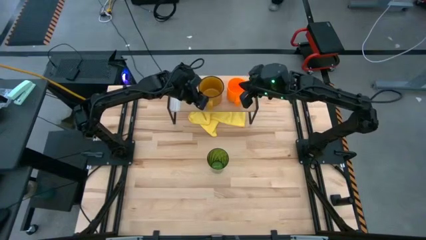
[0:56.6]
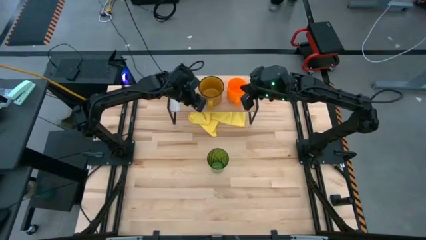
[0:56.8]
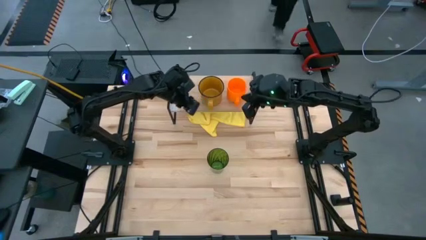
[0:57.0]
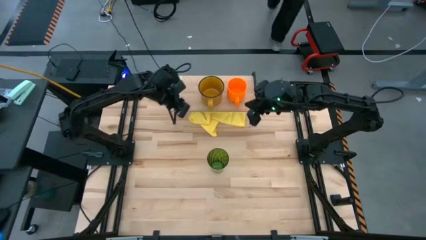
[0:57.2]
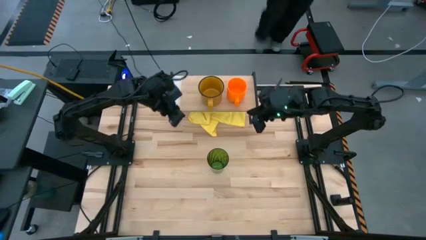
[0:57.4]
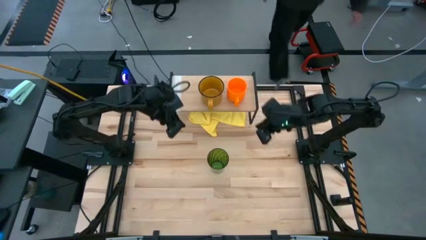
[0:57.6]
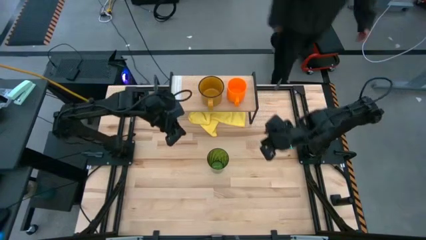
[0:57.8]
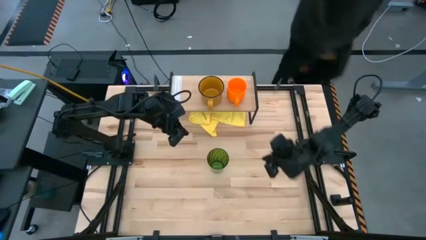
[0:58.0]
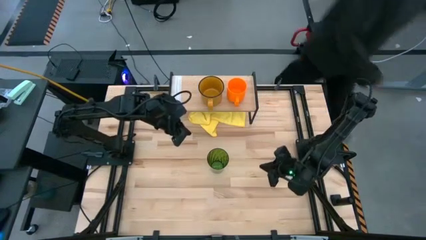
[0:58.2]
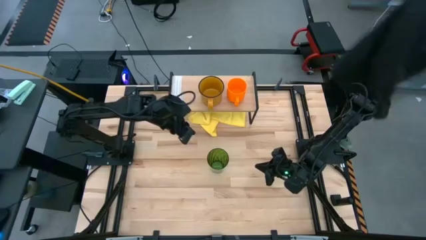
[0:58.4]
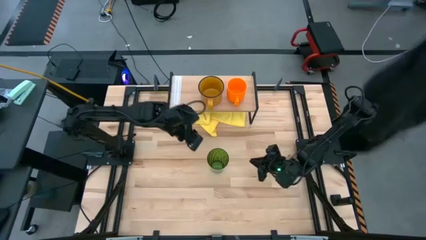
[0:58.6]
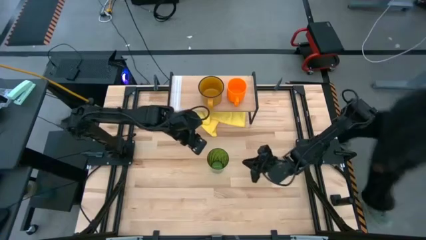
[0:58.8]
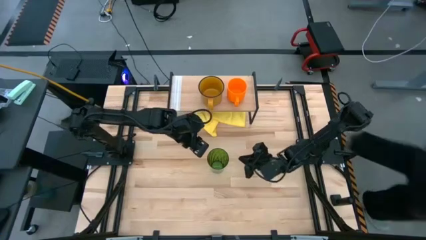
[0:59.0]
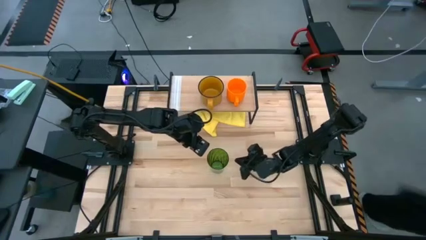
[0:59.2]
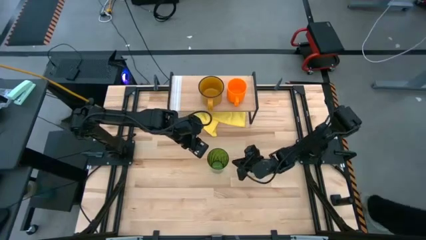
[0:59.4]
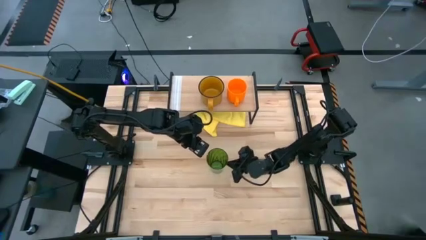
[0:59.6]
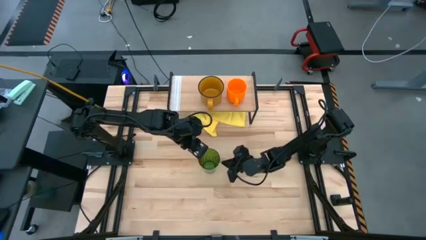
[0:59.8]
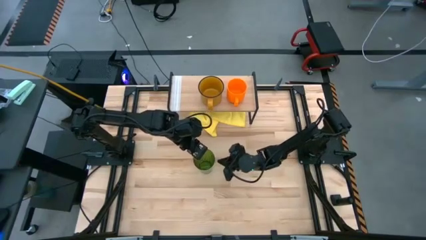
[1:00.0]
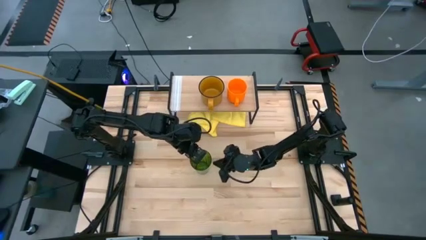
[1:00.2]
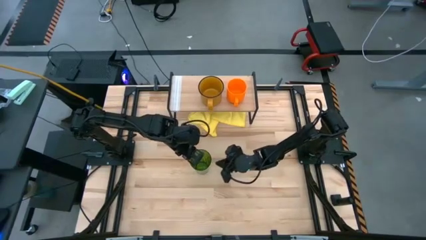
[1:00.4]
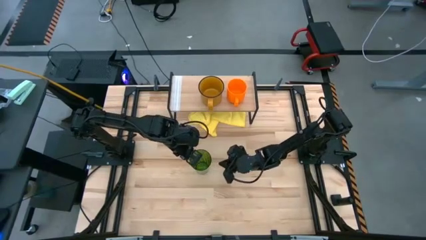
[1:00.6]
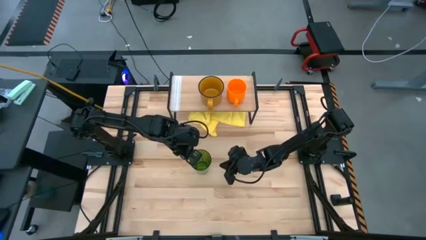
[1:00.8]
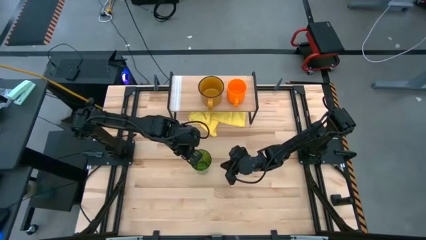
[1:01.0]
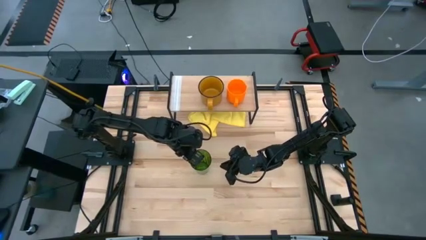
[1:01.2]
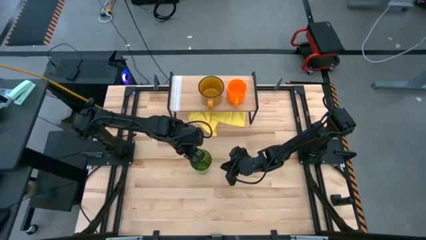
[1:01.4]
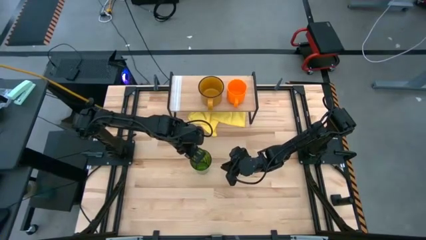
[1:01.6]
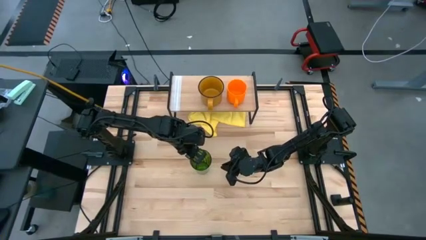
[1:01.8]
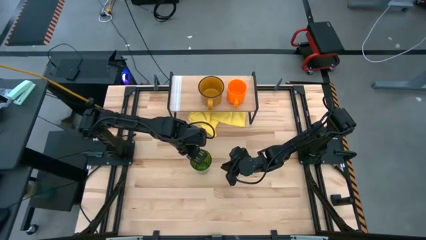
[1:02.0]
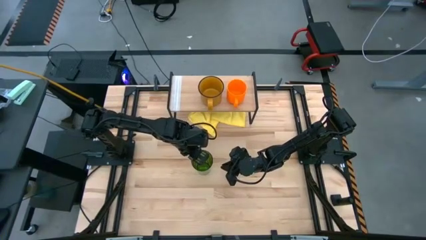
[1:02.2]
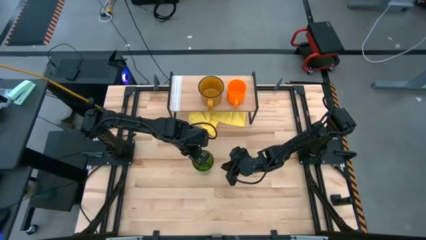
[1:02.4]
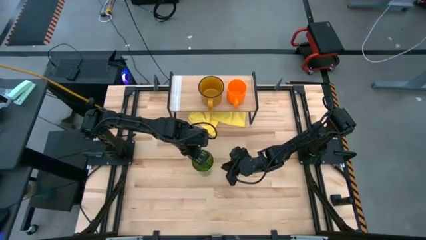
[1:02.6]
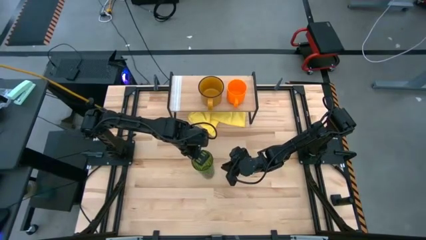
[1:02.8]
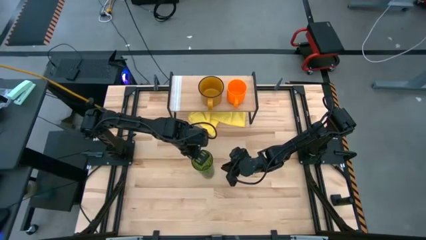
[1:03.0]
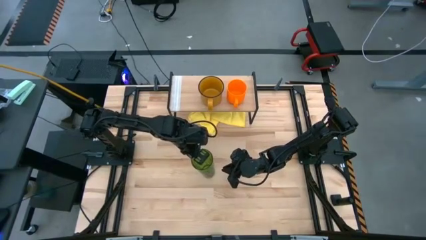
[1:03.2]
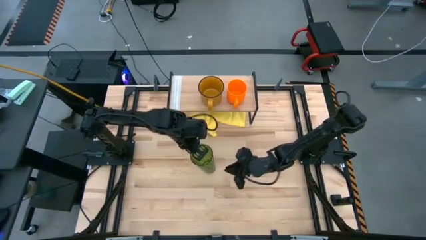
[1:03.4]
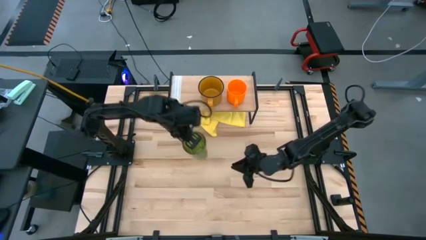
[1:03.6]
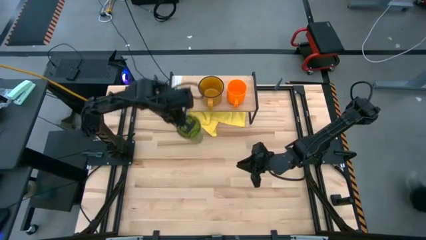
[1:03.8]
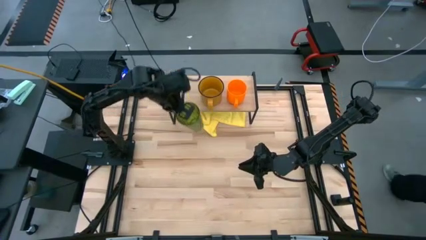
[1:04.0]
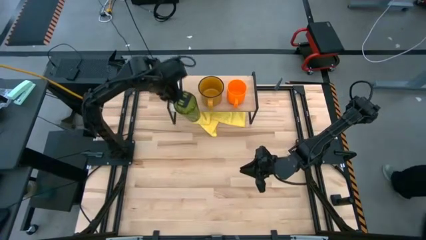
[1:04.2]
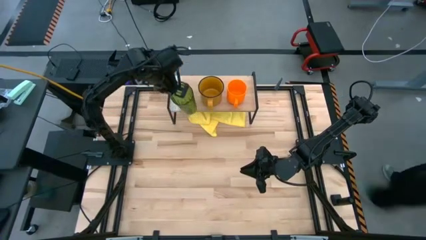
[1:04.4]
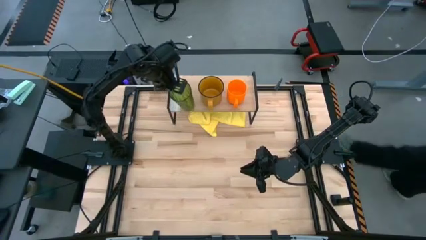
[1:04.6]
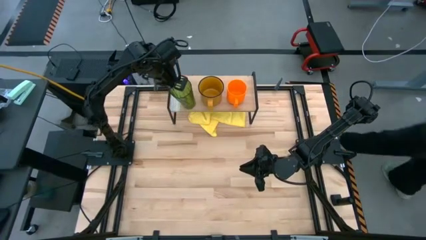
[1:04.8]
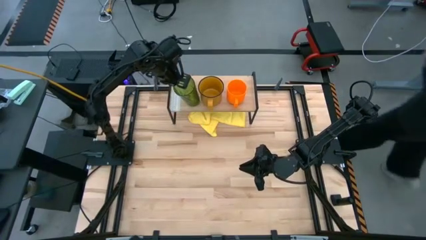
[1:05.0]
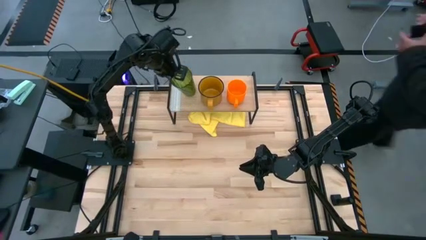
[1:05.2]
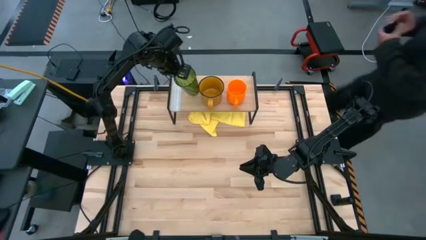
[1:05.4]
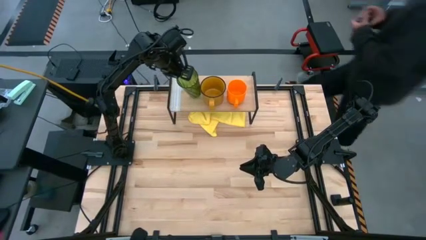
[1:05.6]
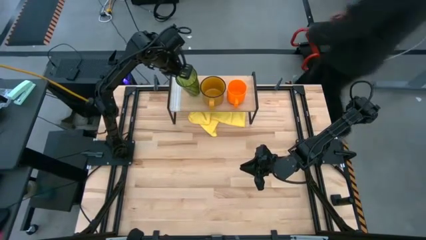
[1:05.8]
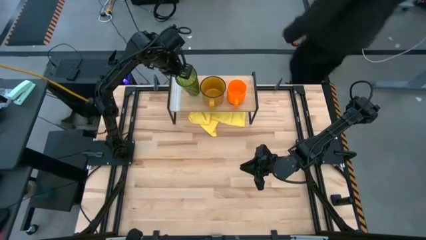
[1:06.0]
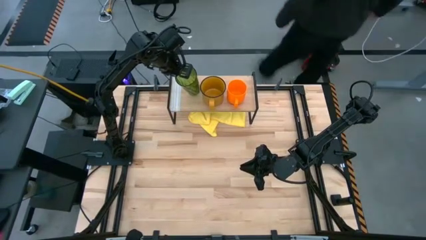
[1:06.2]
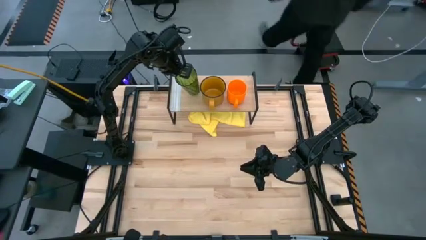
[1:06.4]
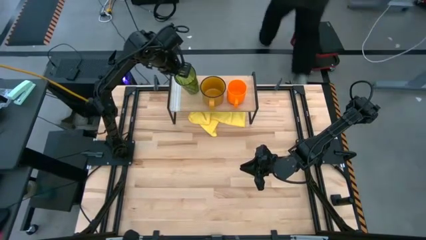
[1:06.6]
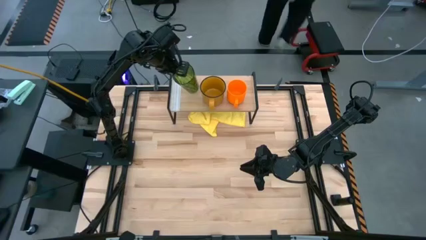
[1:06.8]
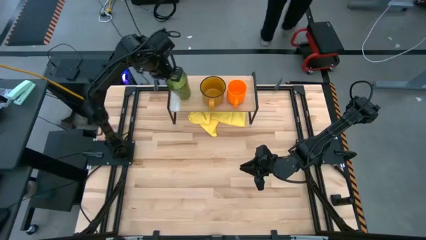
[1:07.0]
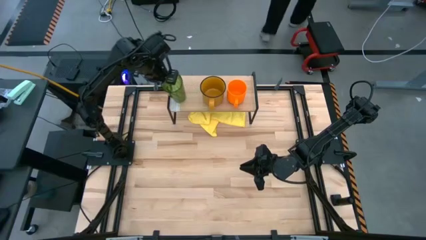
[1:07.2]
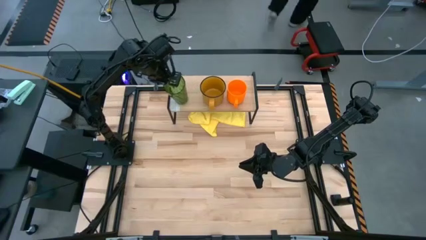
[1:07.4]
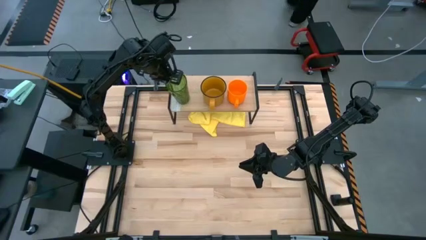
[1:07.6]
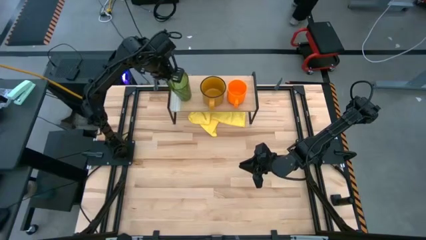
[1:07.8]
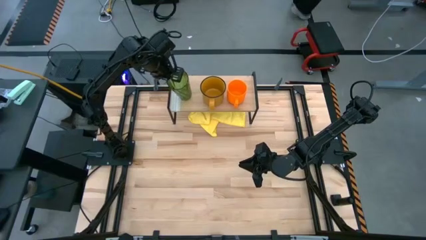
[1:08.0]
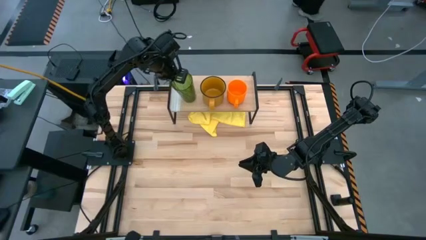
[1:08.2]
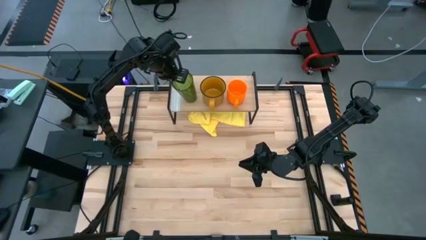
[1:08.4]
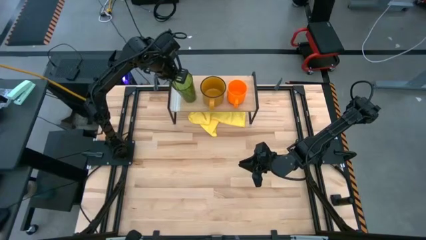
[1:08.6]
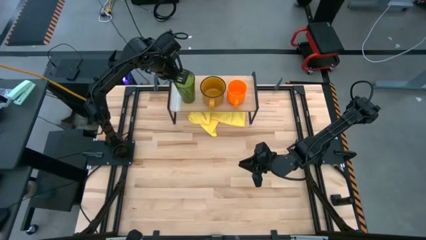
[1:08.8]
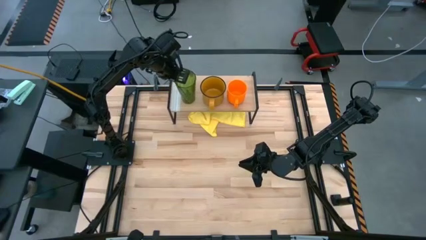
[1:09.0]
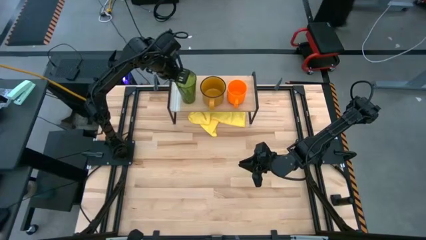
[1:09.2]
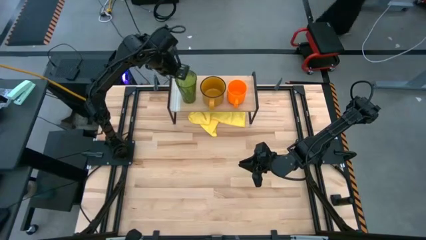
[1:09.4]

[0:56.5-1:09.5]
Task: Stack small to large cups/mugs on shelf
Put the green cup on the shelf

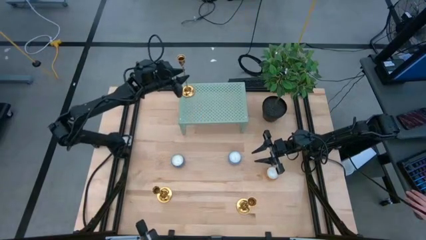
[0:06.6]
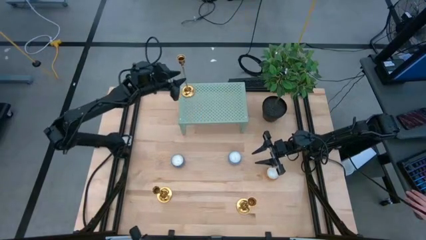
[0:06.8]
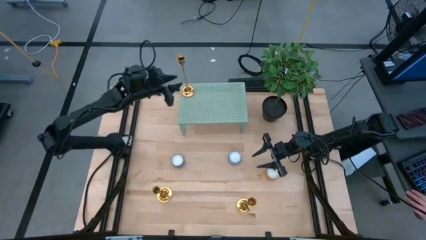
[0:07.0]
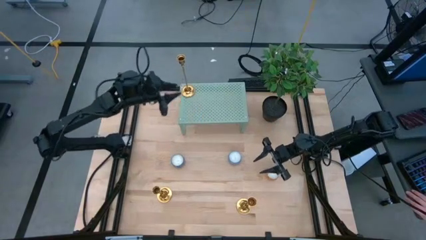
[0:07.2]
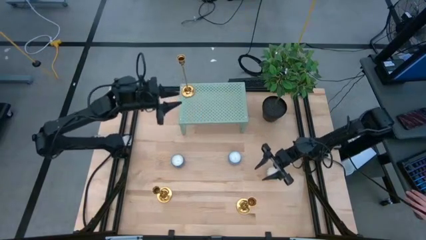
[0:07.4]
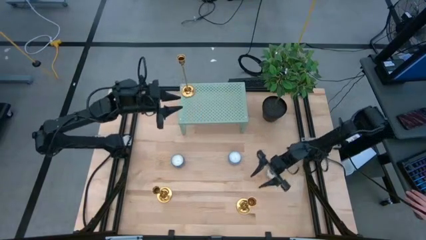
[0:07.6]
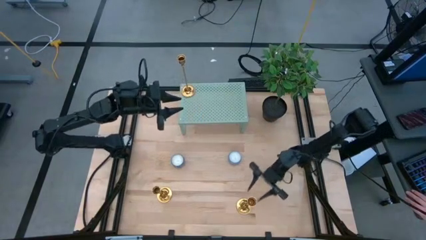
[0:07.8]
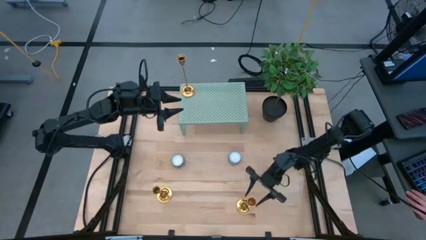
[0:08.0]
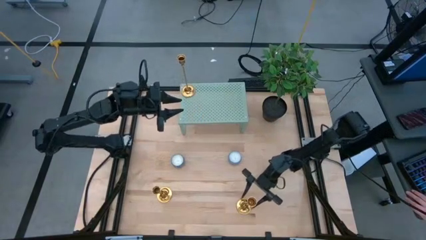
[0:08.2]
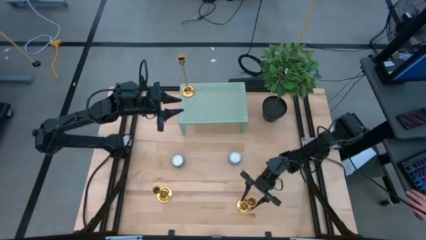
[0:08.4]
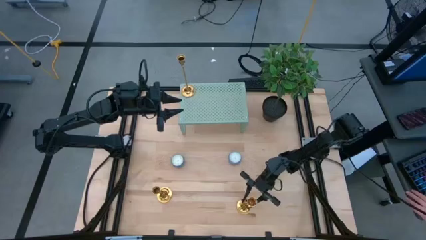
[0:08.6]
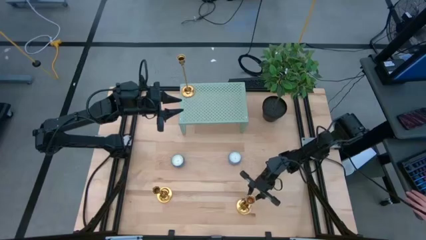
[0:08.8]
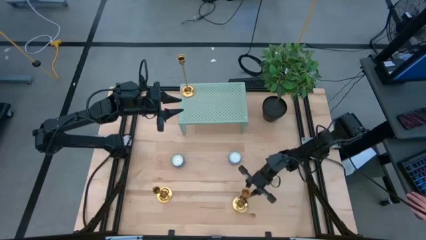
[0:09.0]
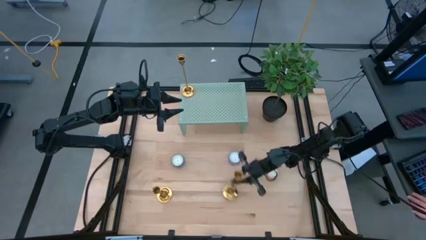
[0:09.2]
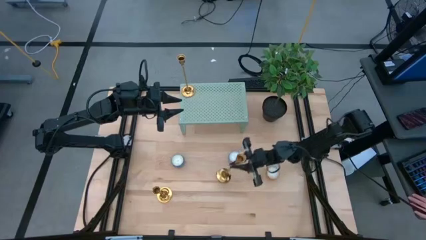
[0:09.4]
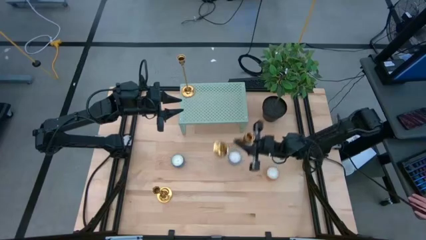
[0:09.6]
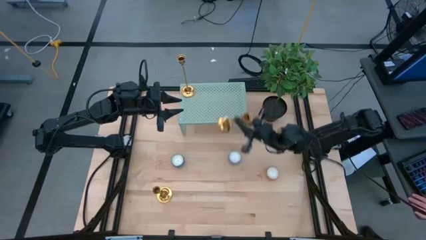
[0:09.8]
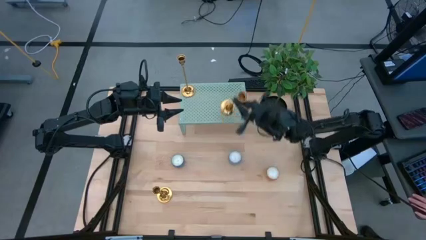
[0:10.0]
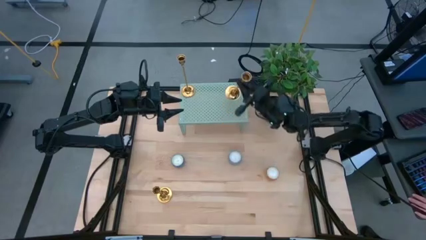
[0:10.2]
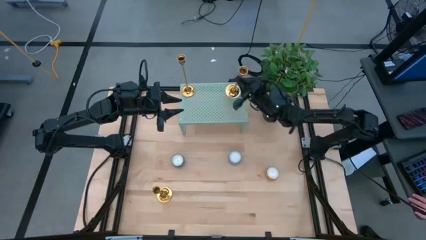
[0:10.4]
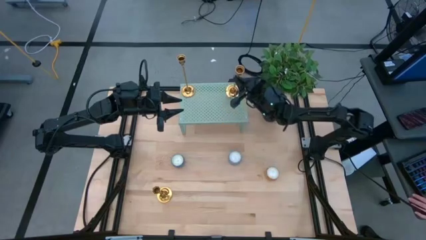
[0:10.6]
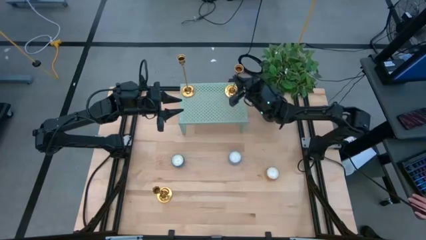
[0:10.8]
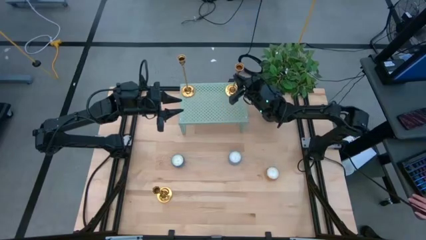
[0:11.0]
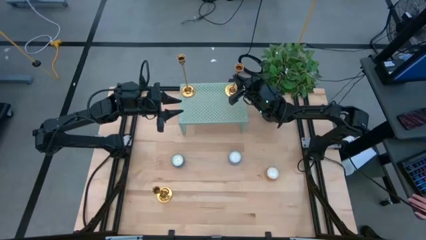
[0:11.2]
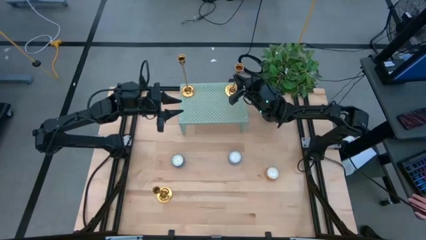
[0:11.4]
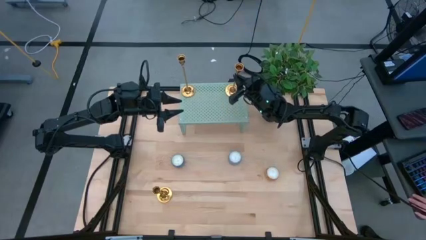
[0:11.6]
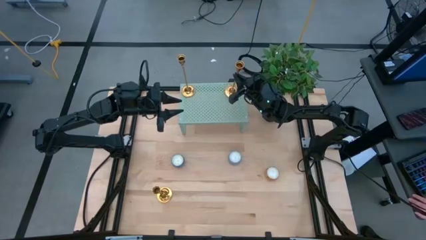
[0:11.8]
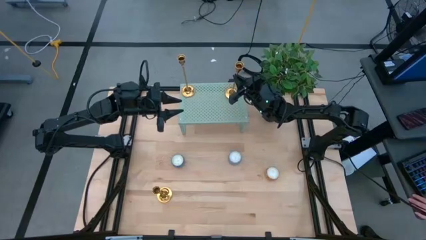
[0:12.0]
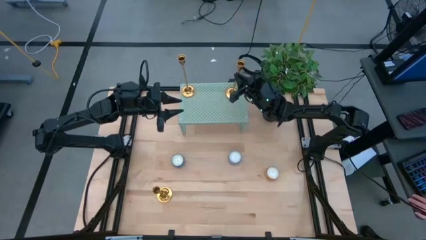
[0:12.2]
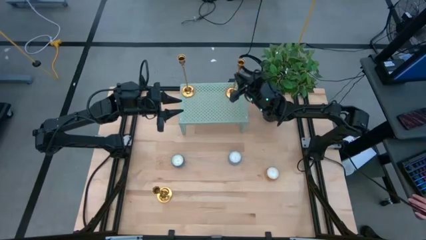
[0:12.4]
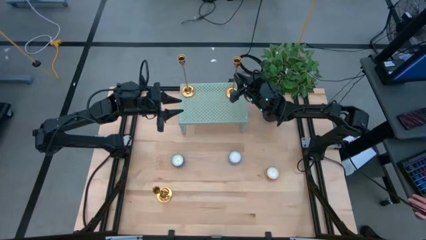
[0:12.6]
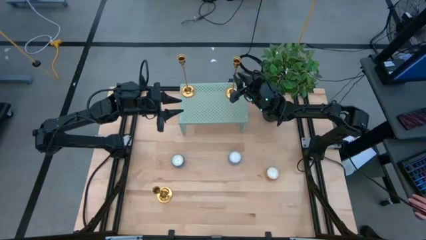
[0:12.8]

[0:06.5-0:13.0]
Task: Pick & Place candle stick holders
Put the right gold candle holder on the shelf
